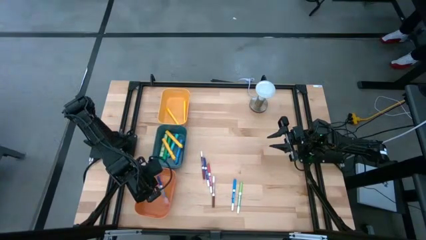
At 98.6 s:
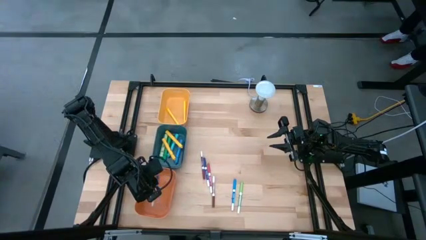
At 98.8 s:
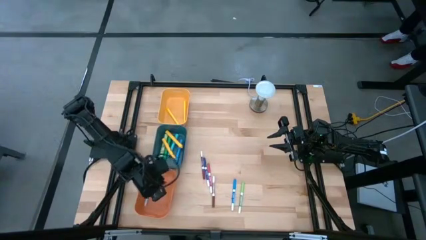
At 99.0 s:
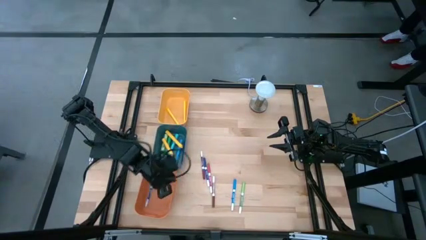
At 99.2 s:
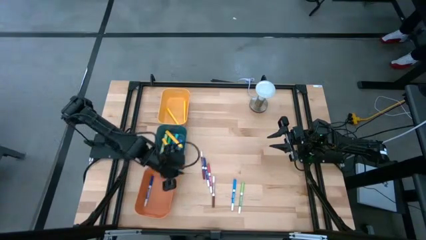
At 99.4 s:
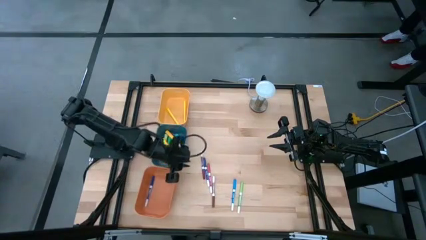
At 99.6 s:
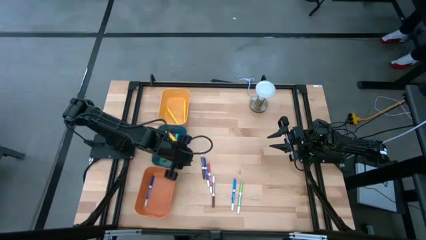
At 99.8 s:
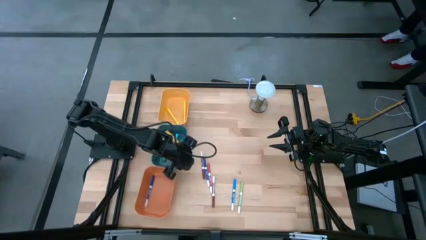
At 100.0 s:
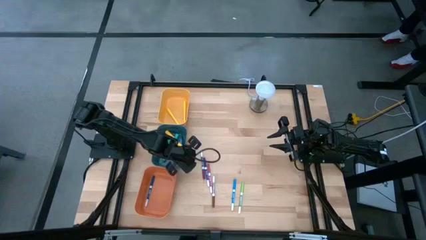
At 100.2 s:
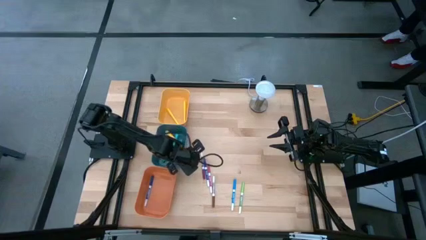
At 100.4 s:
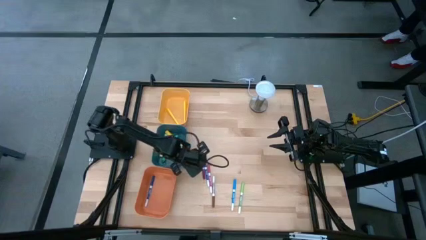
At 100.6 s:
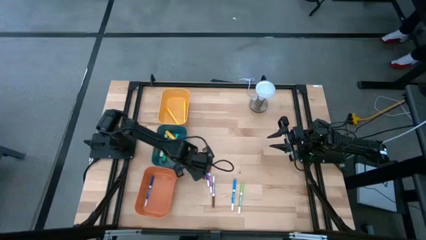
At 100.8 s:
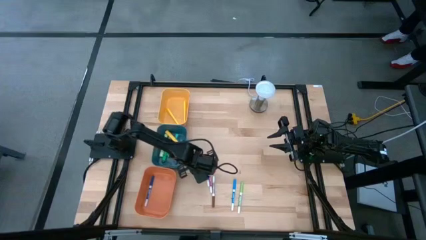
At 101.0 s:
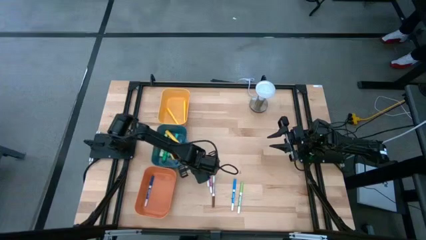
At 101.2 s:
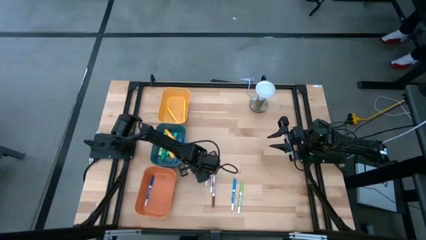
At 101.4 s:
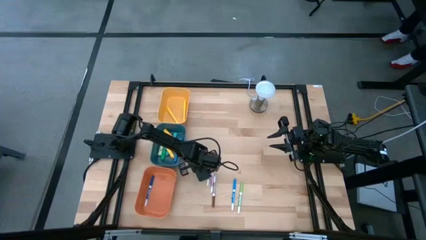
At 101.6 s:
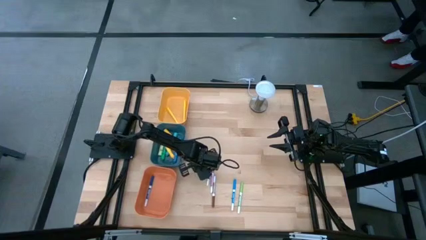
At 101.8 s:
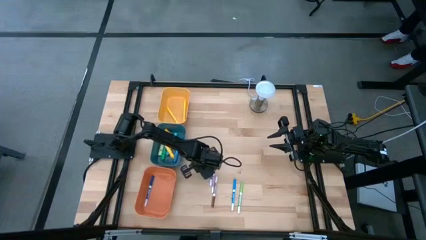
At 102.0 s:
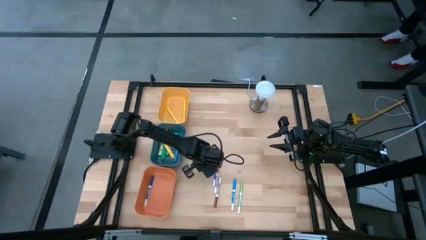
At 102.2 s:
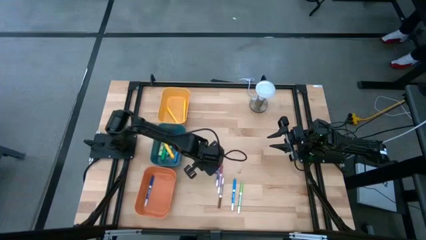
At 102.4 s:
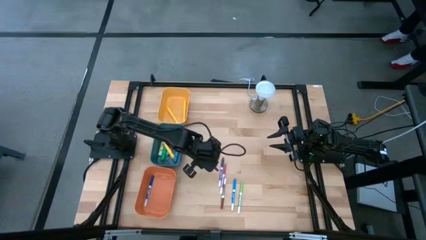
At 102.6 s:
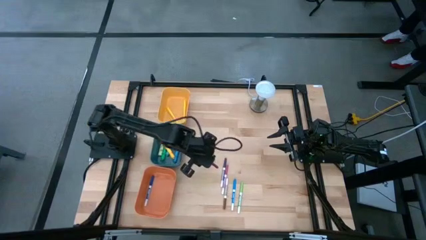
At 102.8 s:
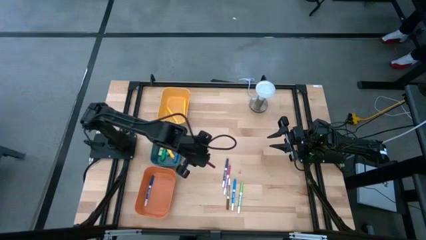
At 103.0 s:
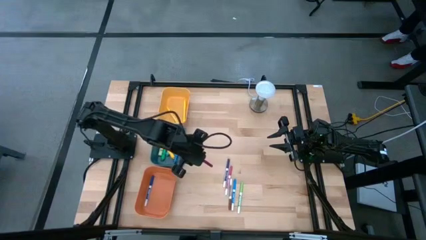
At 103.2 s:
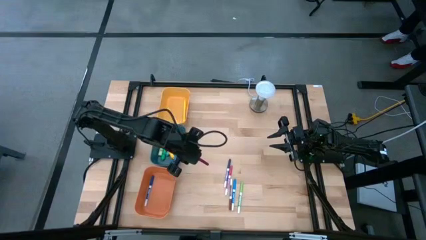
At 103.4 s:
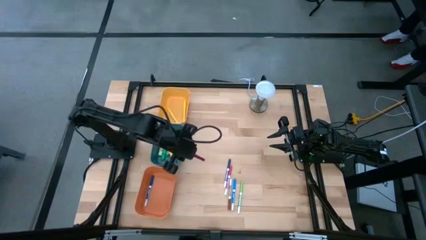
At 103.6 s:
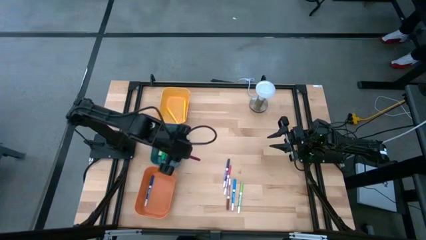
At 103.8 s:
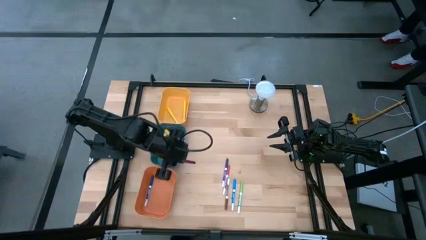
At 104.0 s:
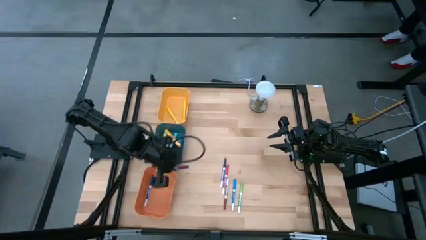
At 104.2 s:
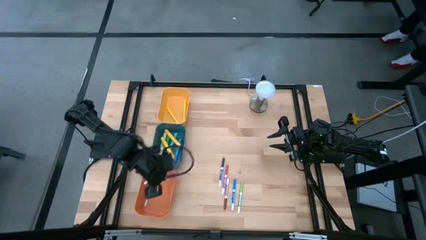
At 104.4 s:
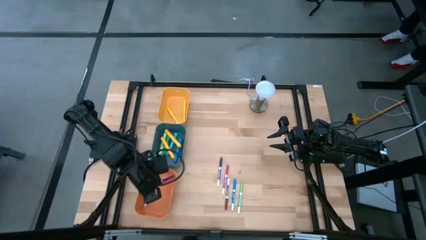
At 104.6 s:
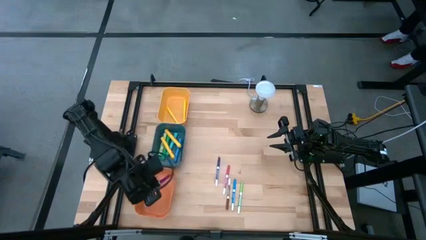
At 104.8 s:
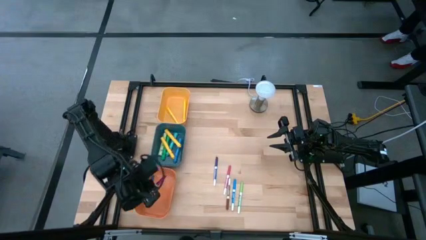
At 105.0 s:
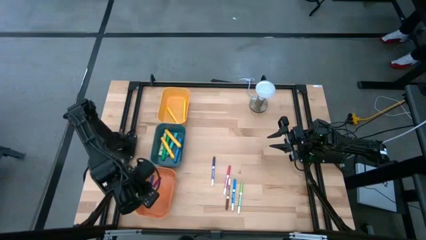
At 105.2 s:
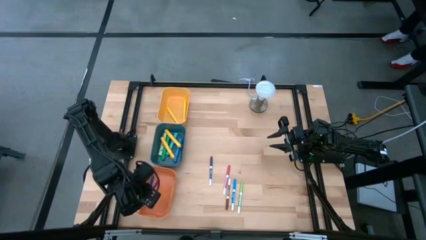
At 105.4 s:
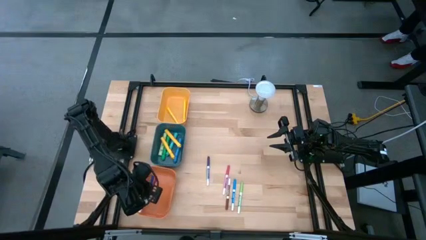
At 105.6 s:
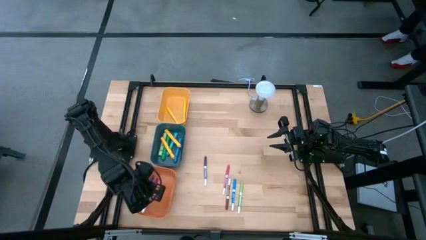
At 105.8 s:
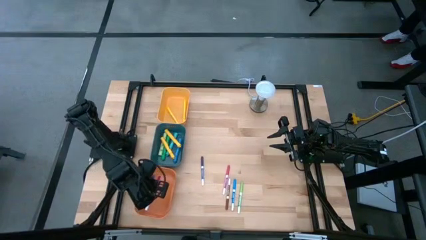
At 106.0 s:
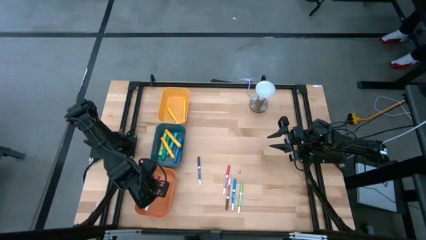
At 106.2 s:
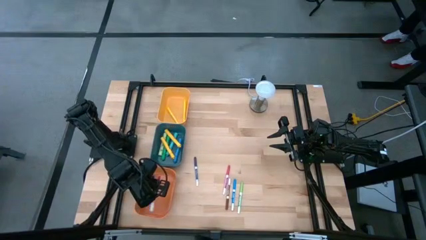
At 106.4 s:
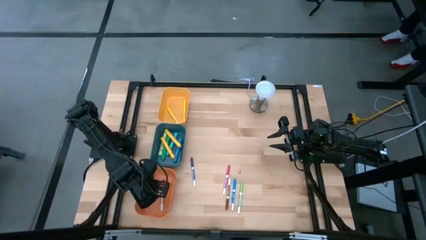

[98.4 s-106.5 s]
Task: Pick & Place Markers
Put the maroon marker pen into the orange bin

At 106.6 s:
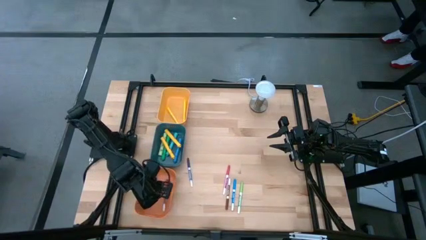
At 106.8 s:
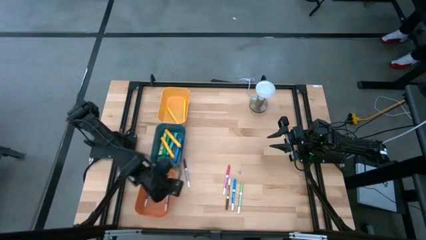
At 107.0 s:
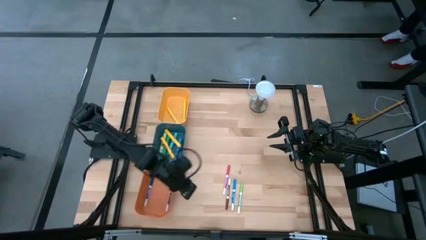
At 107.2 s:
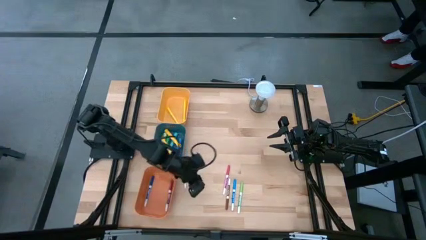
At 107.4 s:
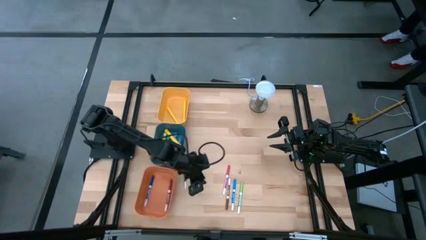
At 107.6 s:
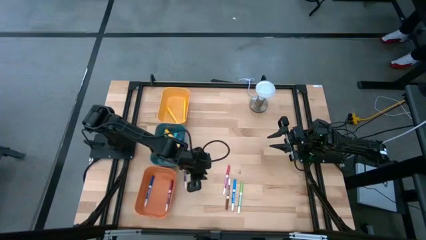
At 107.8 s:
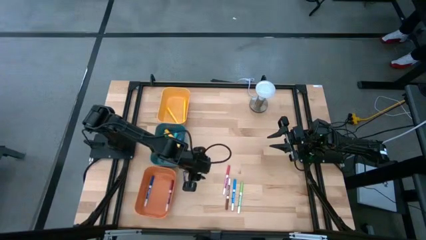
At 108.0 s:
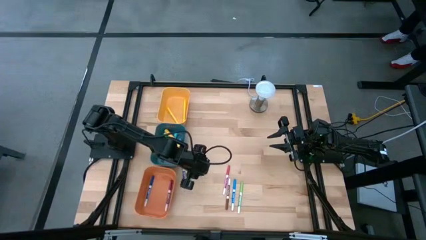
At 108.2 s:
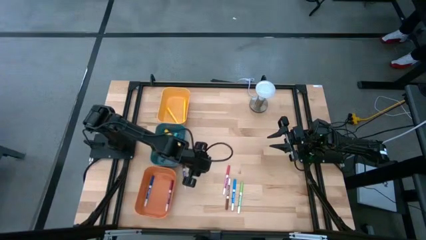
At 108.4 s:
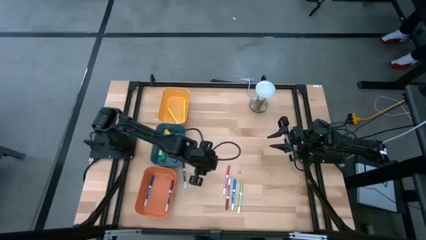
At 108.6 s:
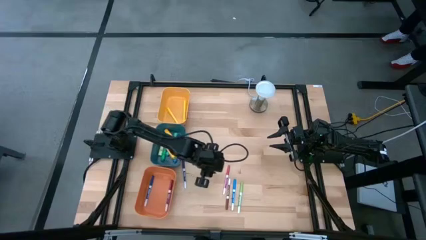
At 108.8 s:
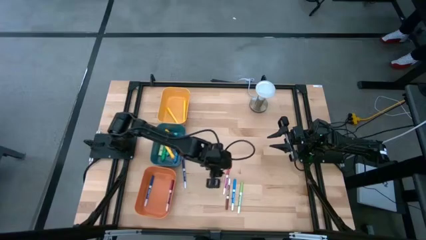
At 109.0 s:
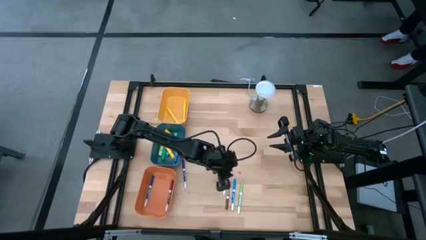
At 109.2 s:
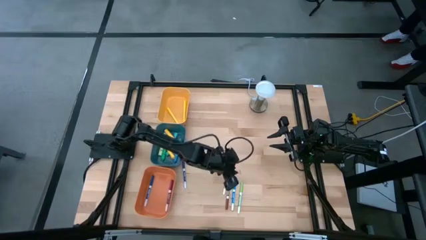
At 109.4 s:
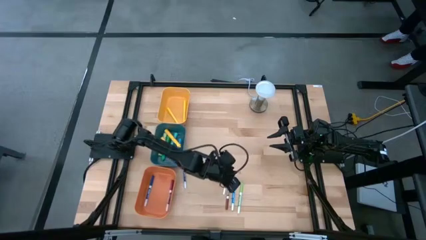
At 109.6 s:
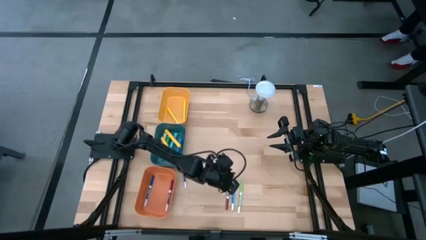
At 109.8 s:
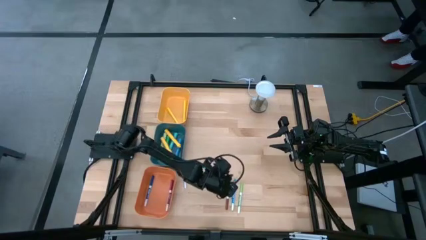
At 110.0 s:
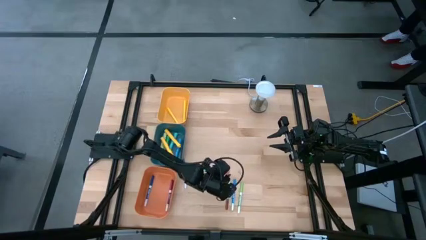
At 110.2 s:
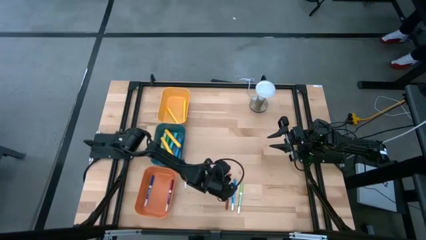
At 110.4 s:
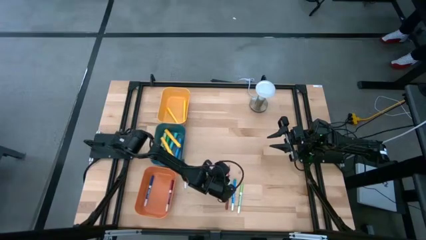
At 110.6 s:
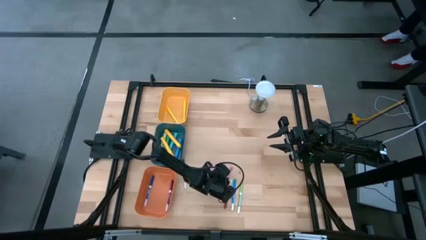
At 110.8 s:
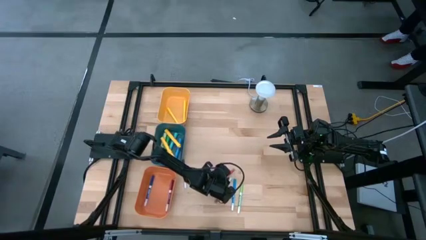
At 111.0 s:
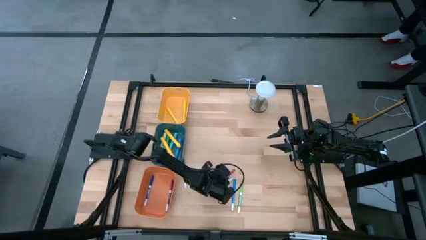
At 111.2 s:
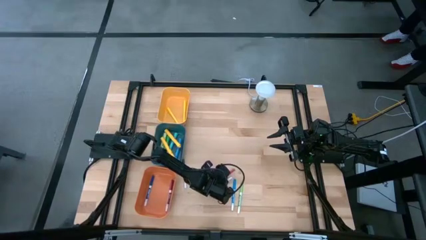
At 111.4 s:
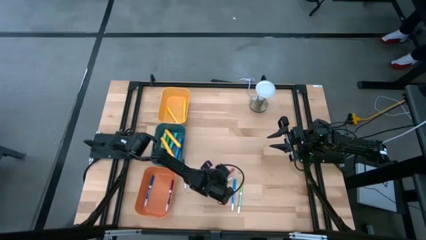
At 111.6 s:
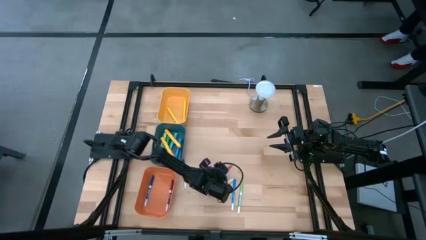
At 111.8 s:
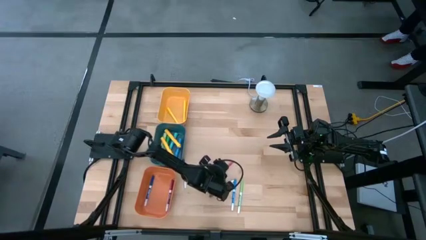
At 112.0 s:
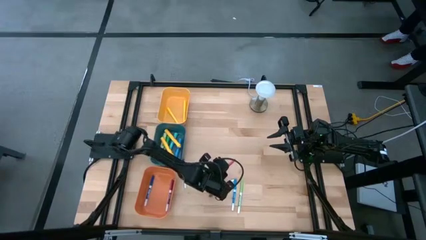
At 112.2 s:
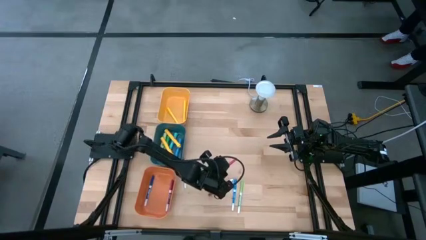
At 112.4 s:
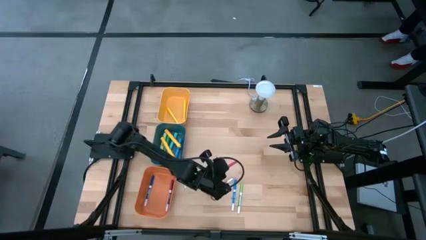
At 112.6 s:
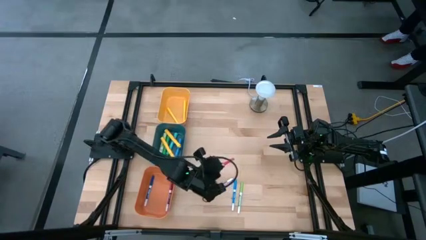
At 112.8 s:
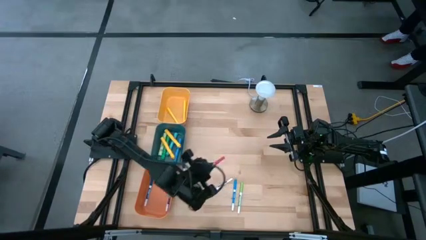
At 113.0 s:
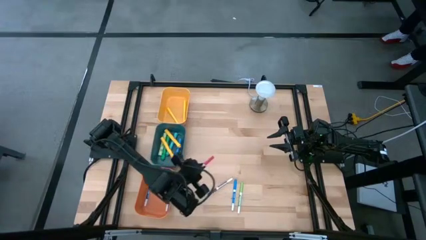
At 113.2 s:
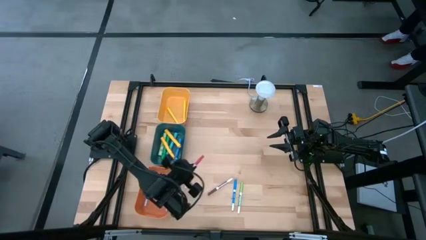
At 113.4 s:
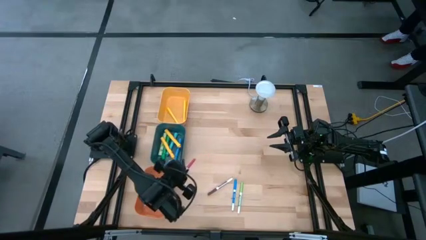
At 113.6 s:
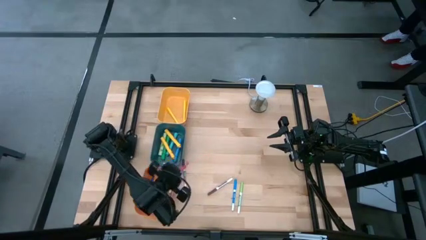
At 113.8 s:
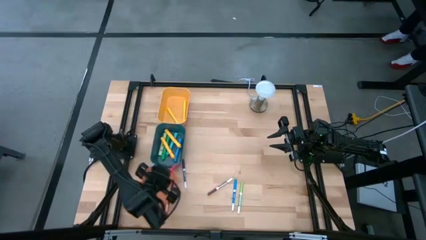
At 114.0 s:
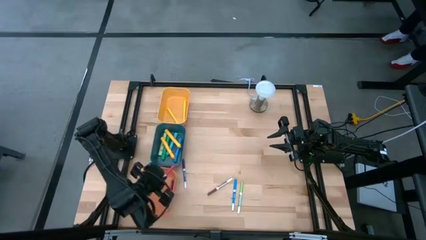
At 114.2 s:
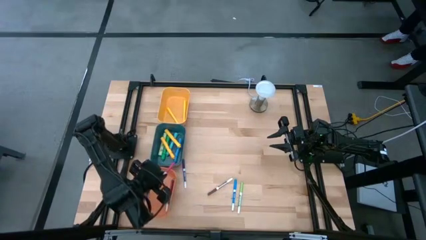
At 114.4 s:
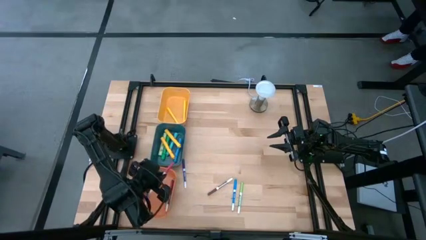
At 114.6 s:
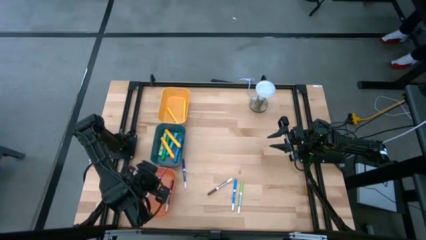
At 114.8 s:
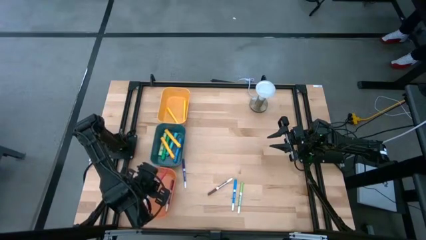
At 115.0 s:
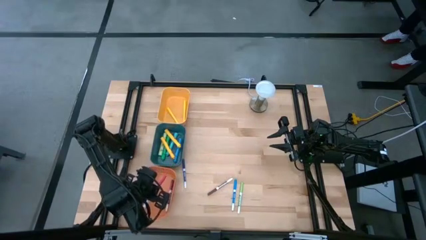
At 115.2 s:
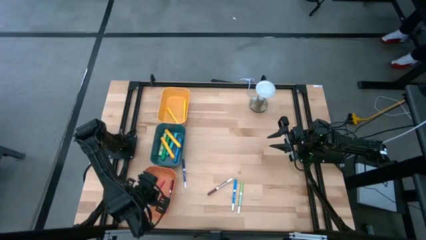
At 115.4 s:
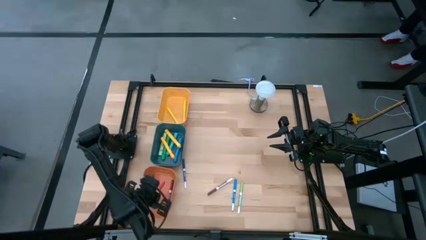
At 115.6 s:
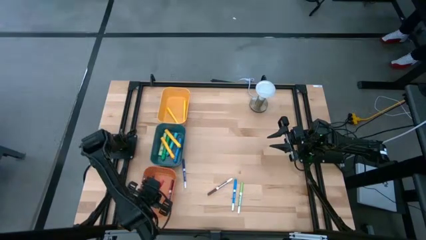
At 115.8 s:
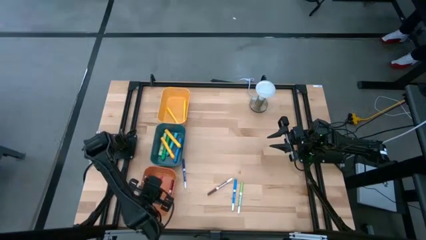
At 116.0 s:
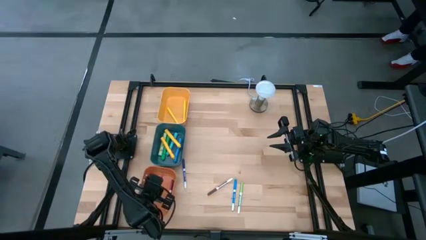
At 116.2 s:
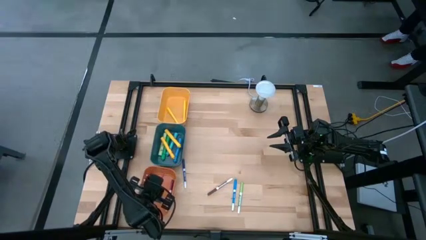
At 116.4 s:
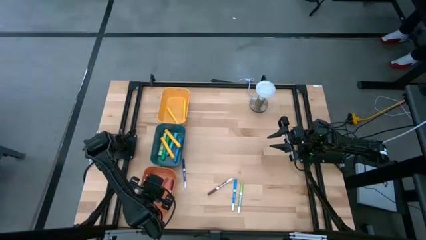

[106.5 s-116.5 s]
Put the pink marker pen into the orange bin
